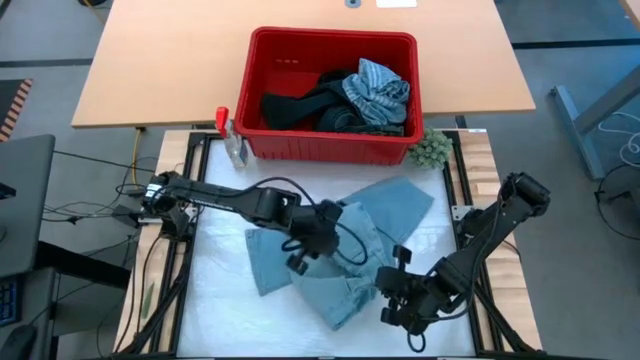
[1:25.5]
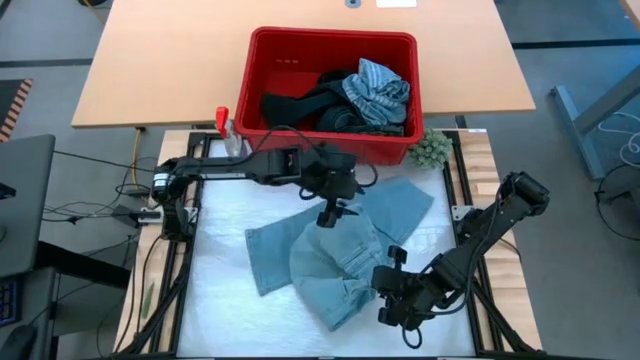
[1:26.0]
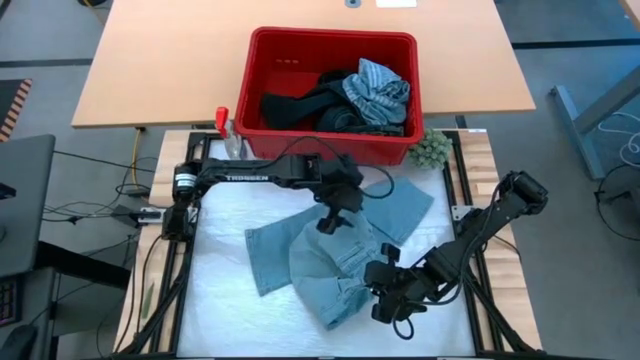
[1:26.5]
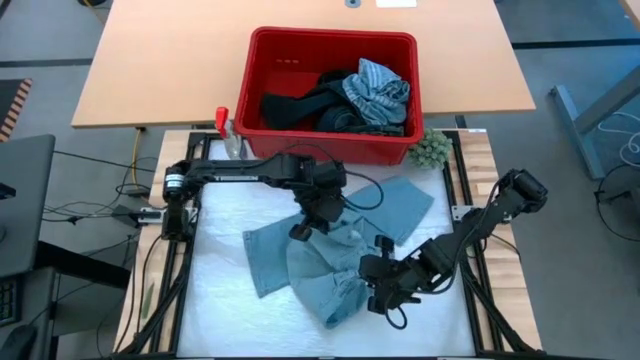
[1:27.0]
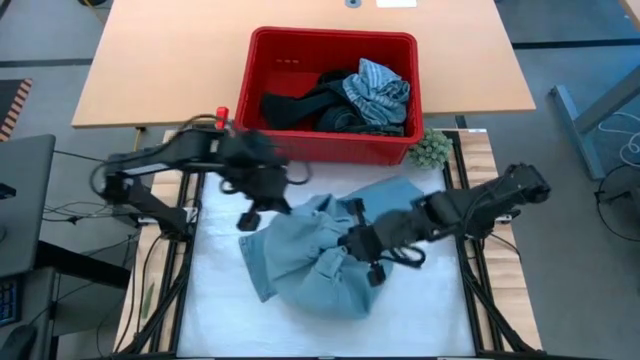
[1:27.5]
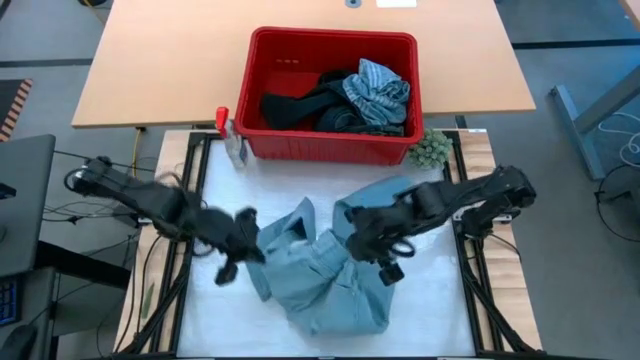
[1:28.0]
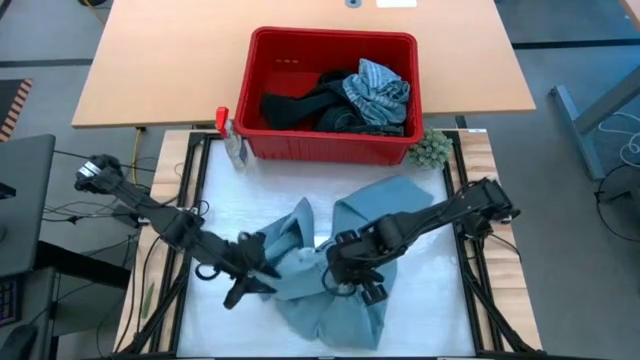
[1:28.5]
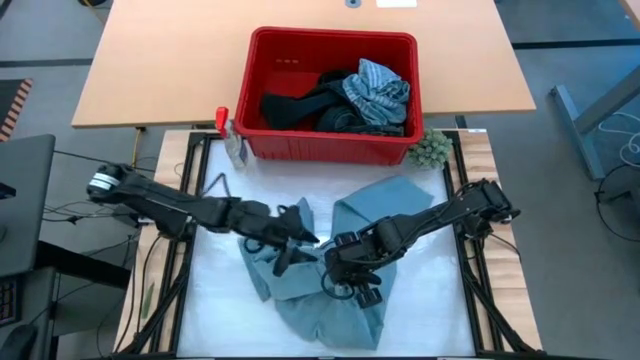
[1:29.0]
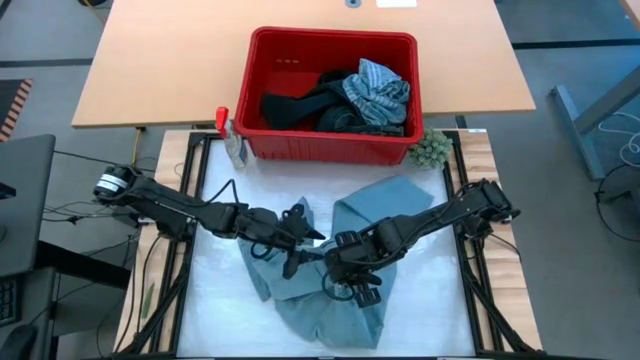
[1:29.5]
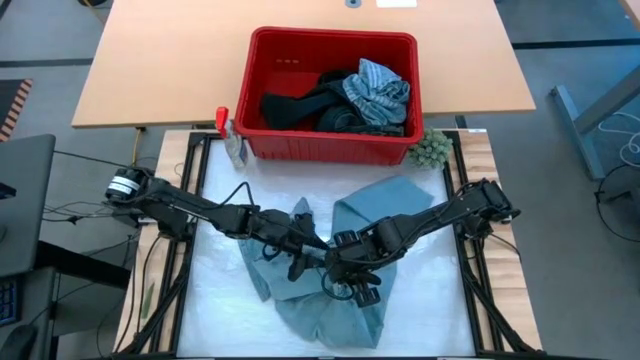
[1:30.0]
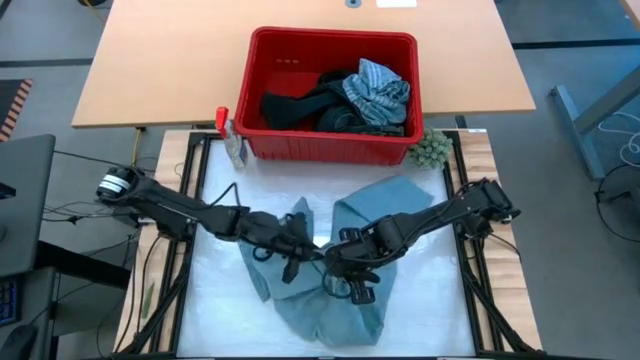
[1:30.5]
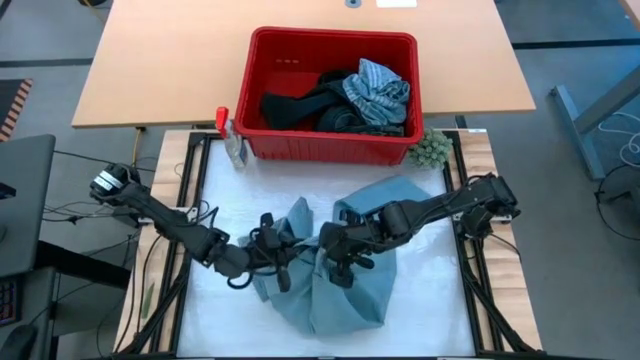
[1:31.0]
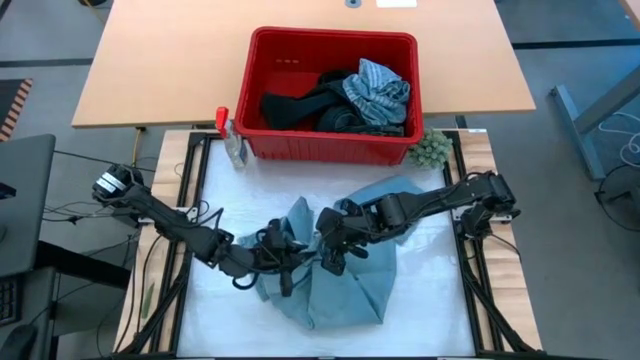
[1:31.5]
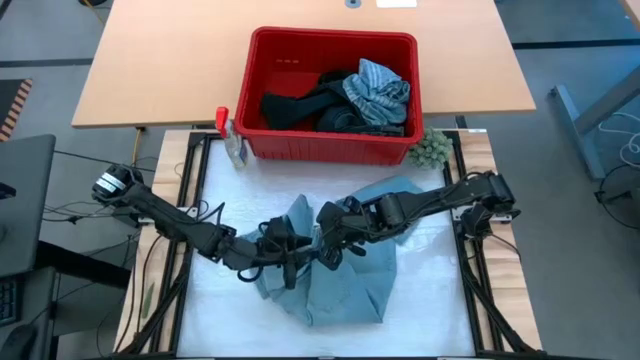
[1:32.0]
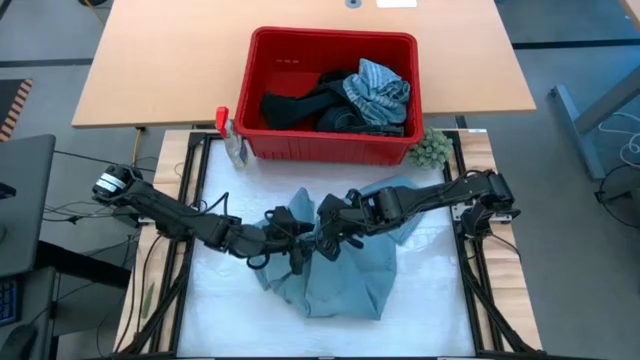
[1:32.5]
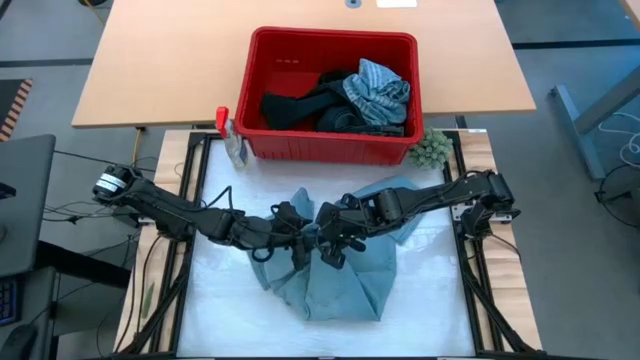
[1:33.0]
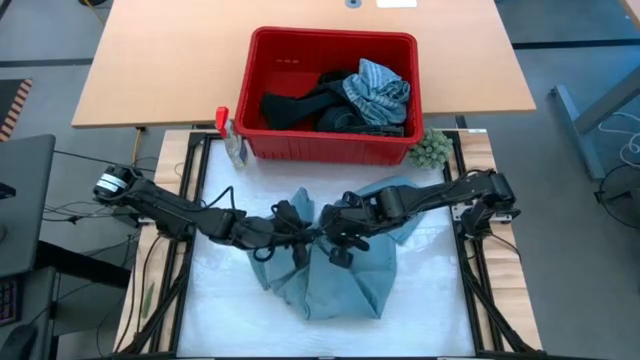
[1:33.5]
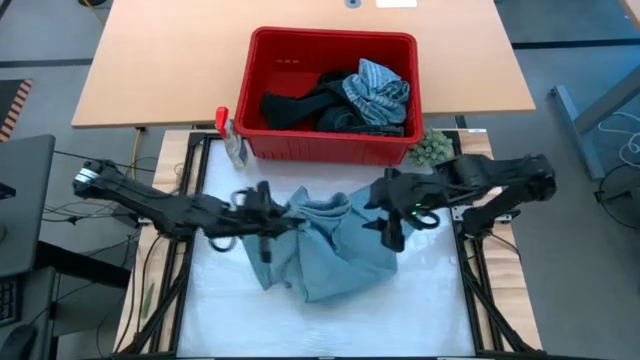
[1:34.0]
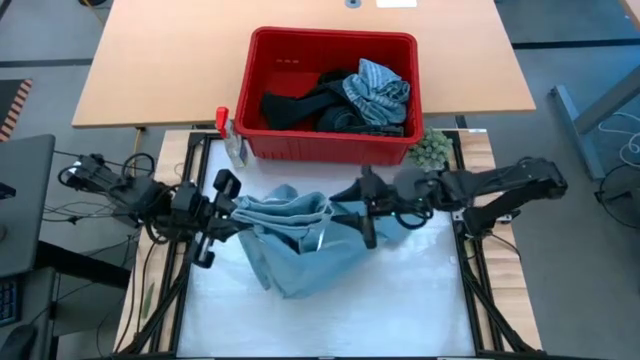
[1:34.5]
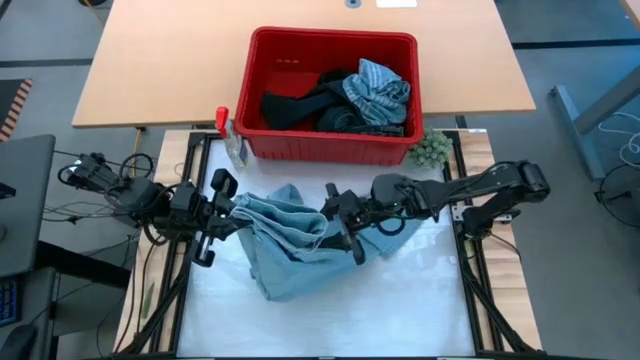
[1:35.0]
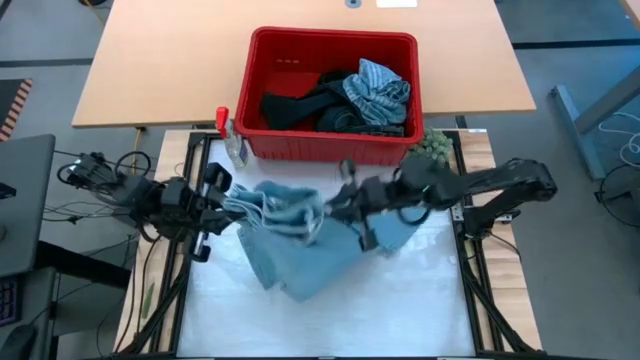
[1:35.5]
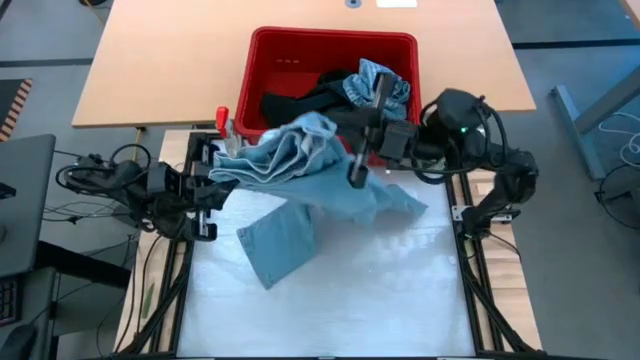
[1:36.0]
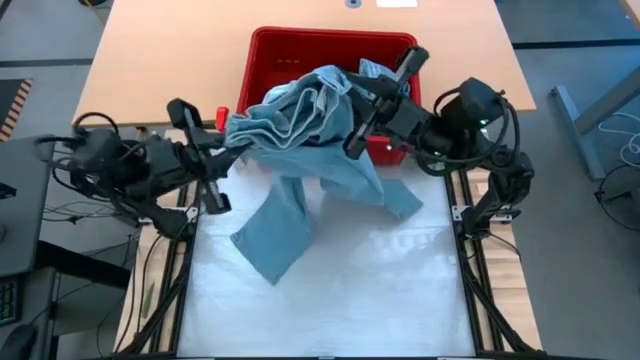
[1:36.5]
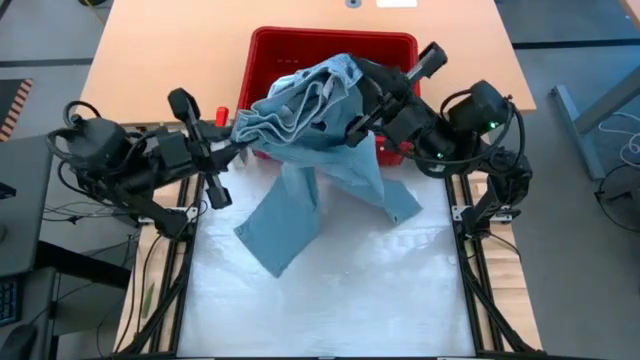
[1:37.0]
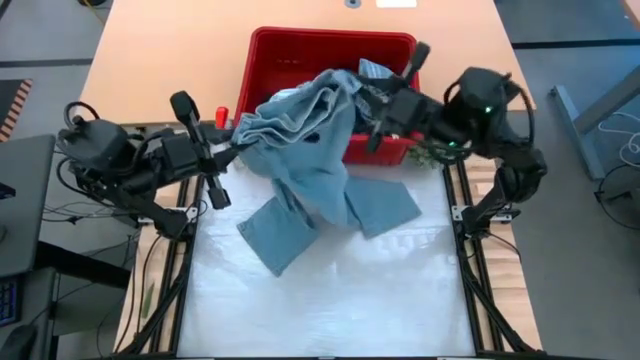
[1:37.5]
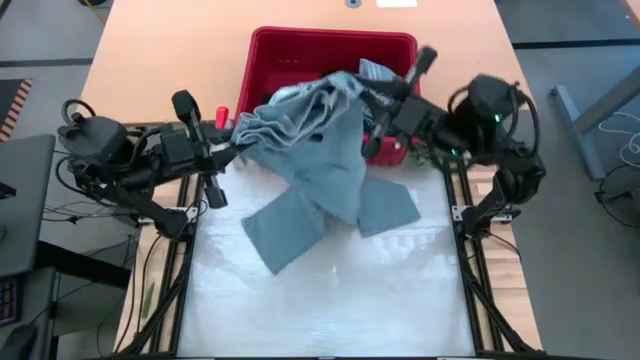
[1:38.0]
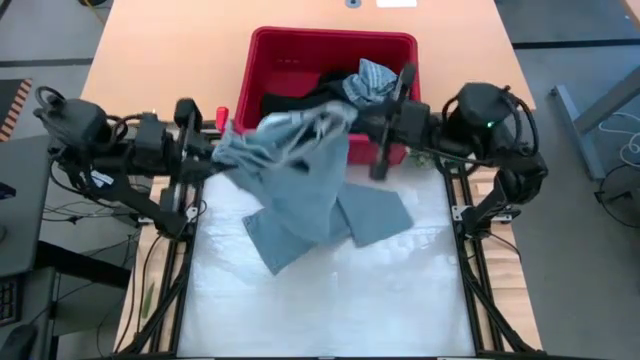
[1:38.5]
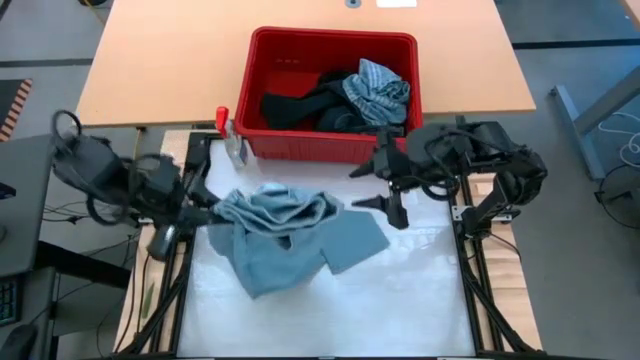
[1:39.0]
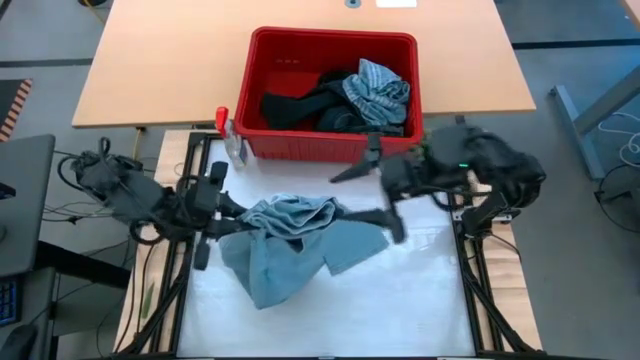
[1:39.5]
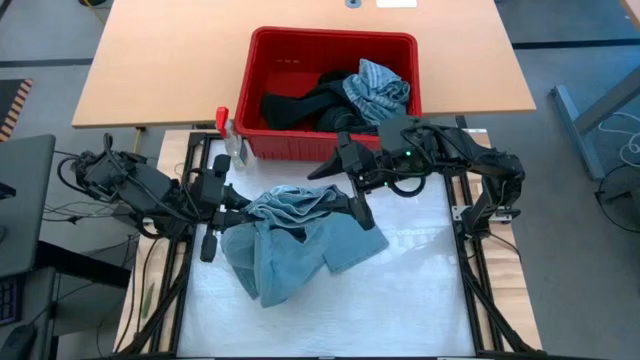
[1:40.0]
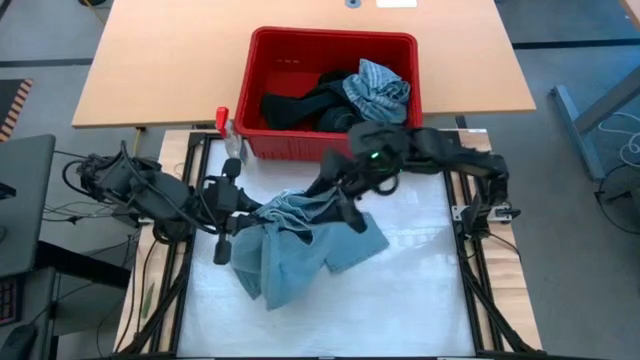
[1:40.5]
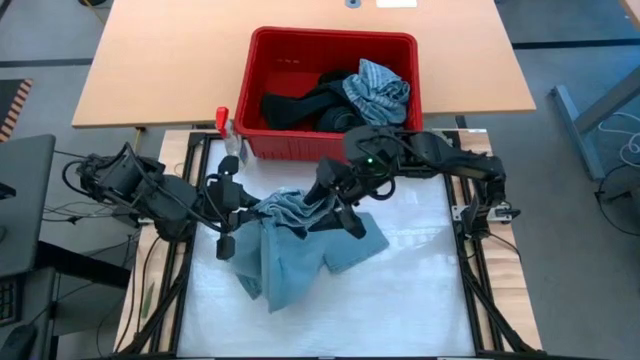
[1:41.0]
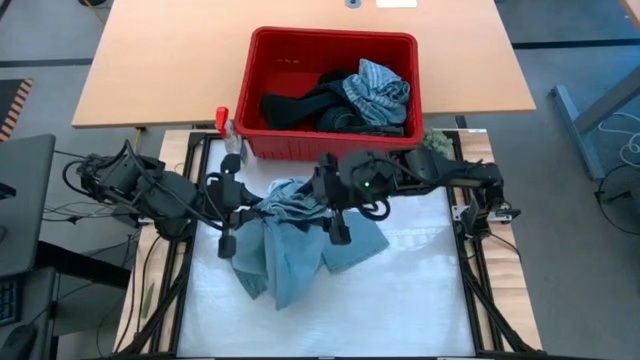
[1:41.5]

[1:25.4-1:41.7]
Task: Fold laundry
Fold the blue pants from the red laundry bin

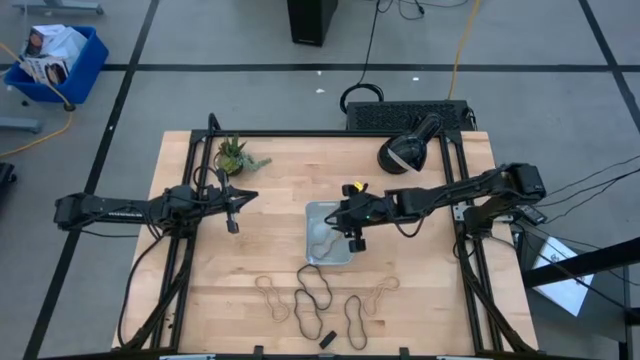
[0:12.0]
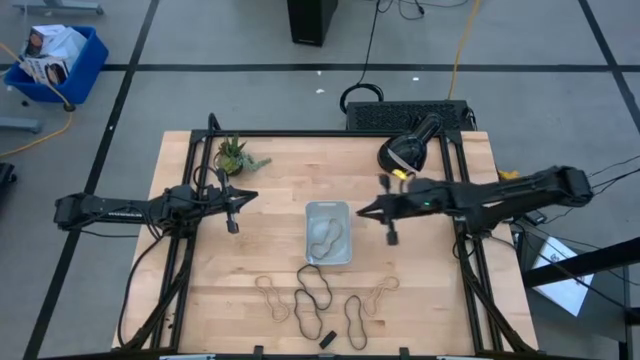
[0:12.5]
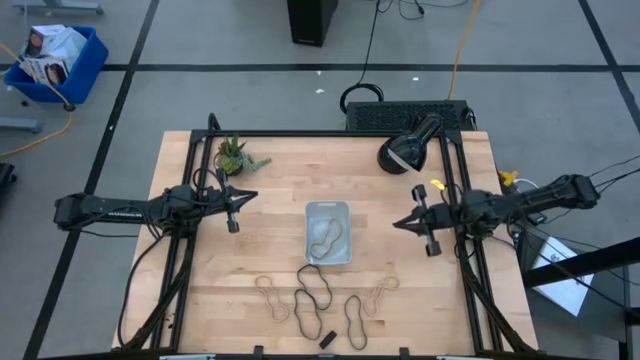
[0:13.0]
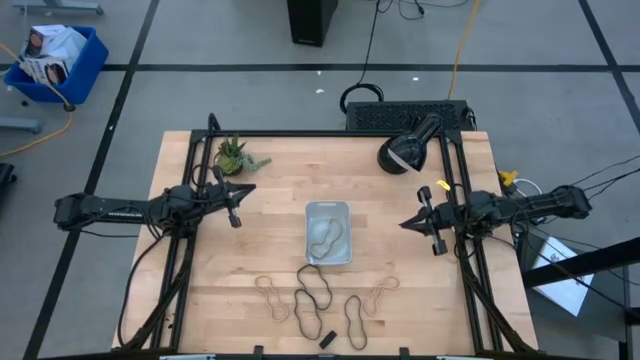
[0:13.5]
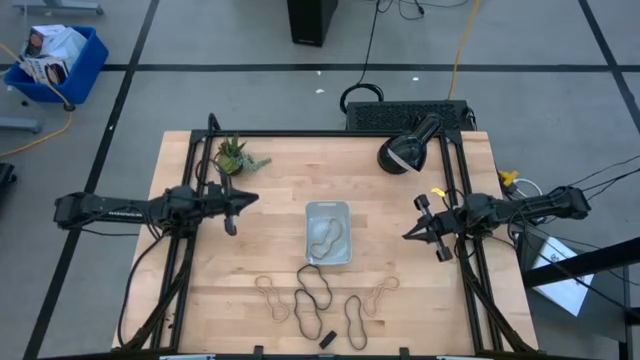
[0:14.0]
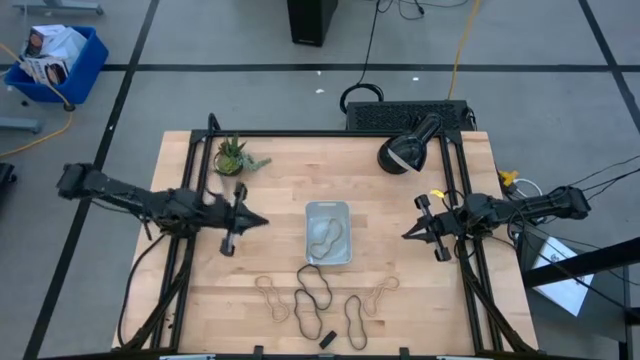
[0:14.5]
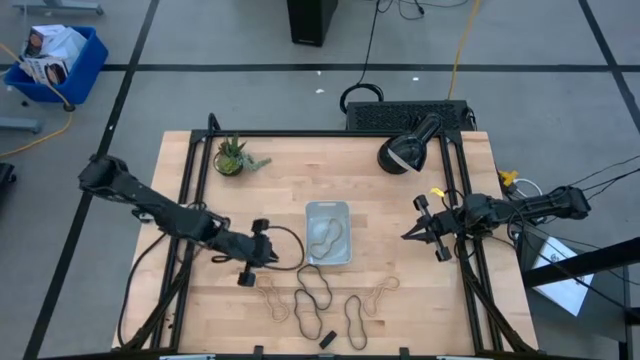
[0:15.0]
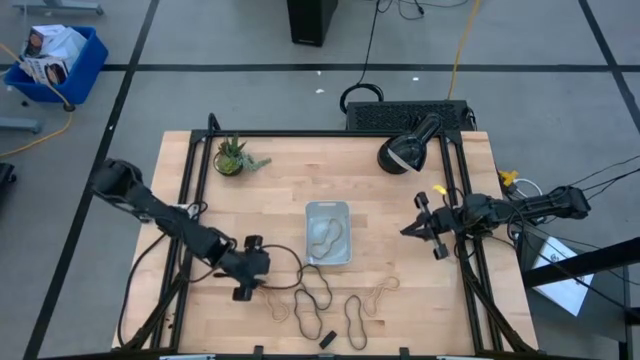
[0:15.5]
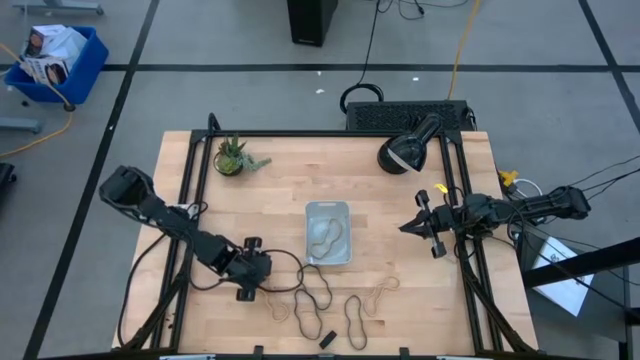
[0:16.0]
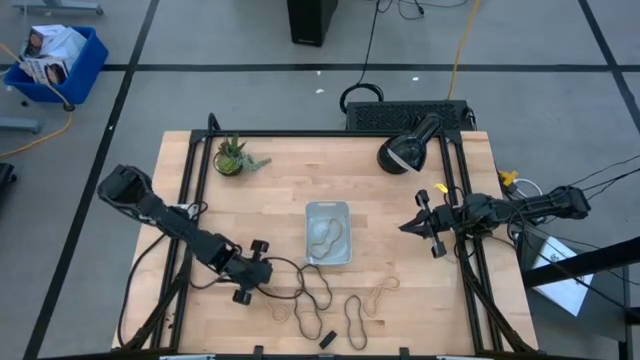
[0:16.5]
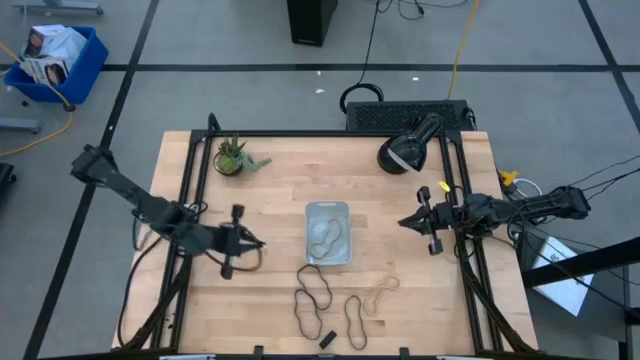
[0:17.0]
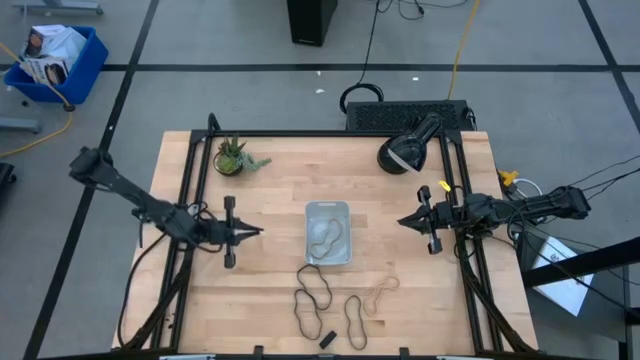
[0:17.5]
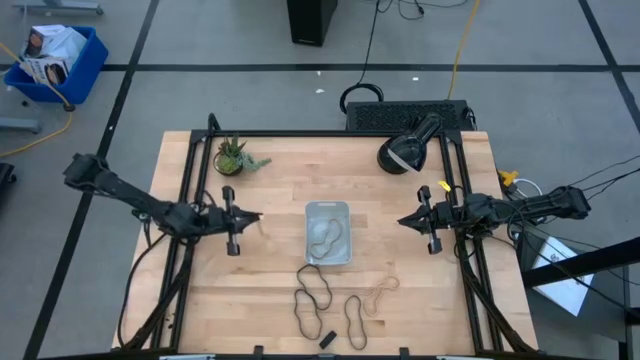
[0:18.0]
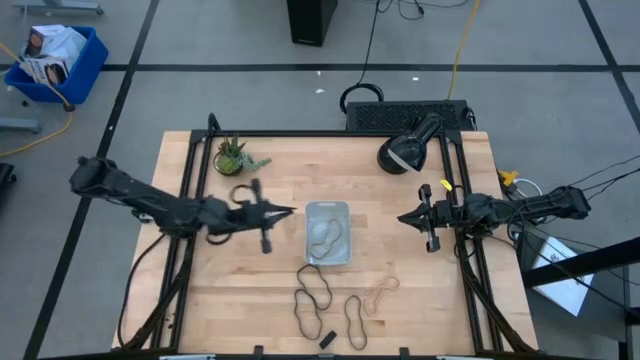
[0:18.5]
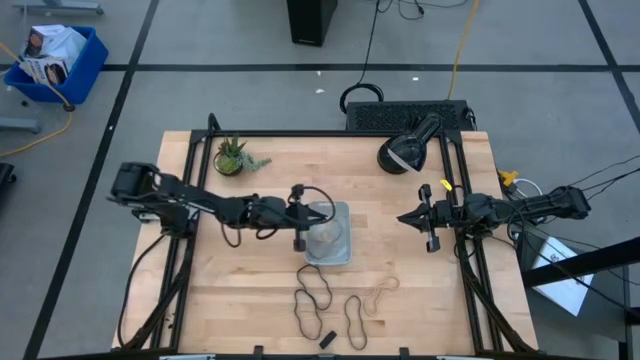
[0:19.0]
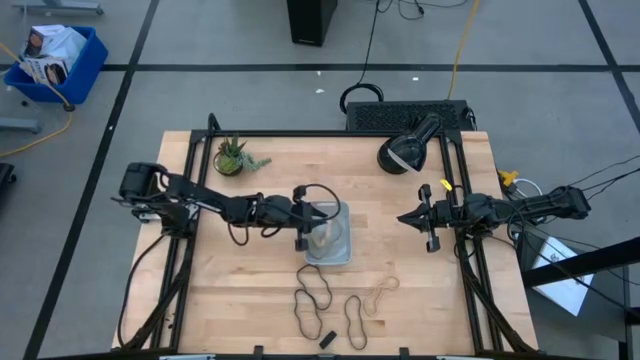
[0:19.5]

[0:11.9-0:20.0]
Task: Pick and place rubber bands into bin
Put the left light brown rubber band into the bin
